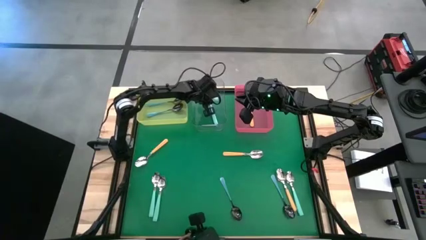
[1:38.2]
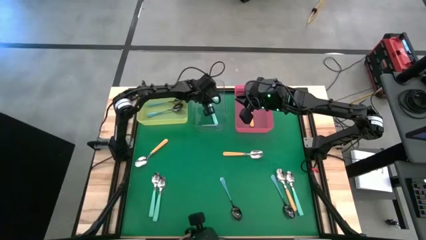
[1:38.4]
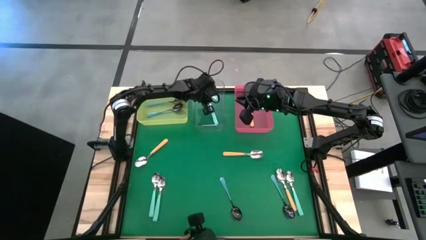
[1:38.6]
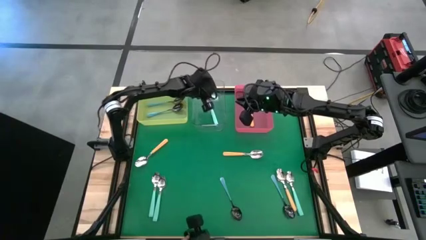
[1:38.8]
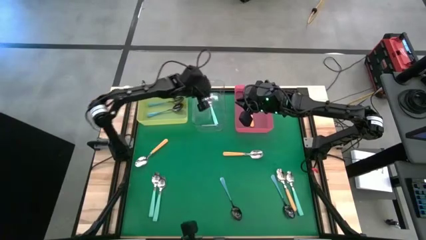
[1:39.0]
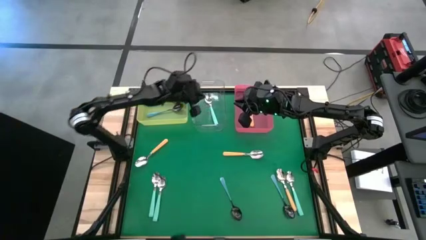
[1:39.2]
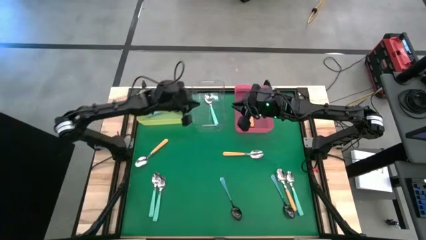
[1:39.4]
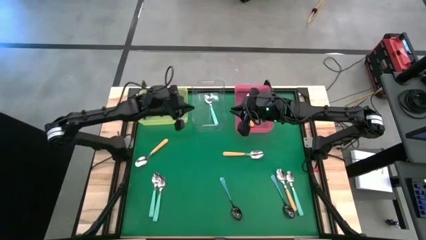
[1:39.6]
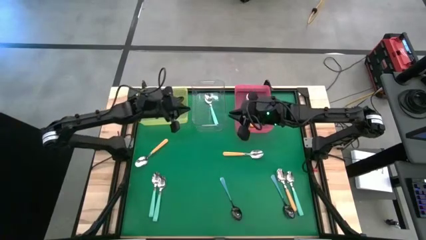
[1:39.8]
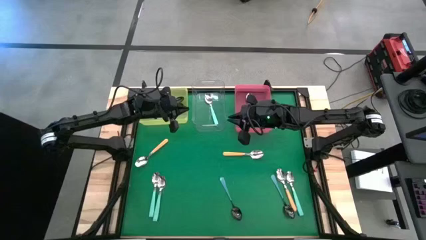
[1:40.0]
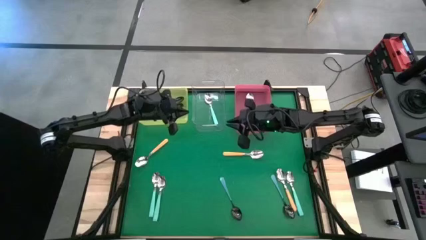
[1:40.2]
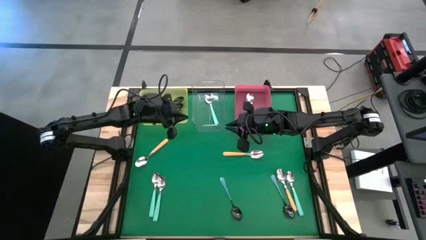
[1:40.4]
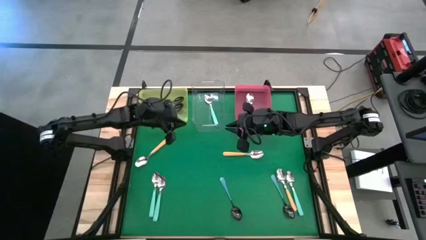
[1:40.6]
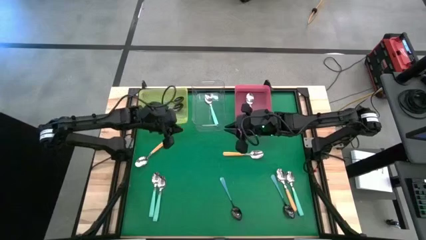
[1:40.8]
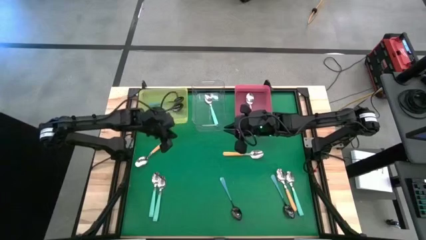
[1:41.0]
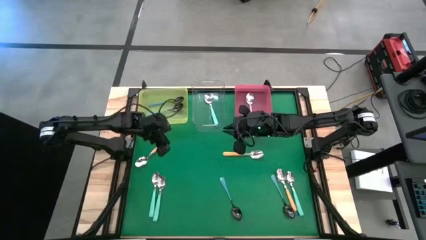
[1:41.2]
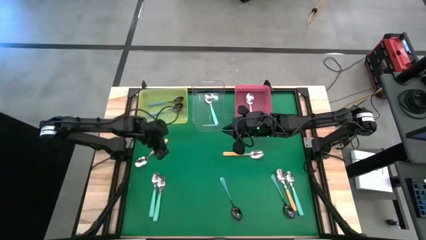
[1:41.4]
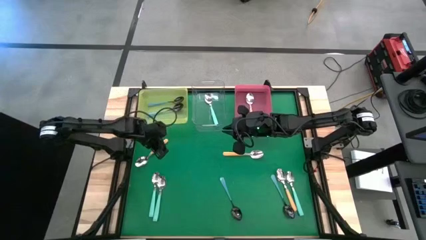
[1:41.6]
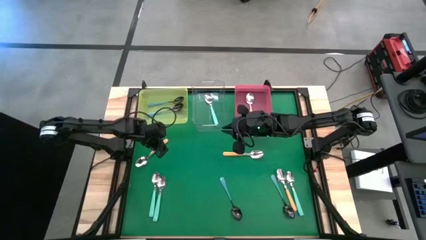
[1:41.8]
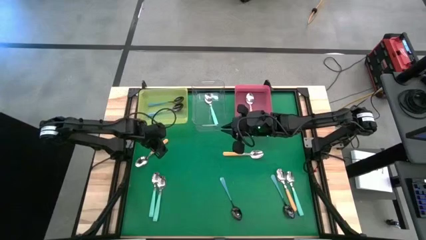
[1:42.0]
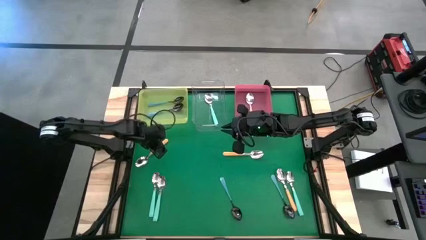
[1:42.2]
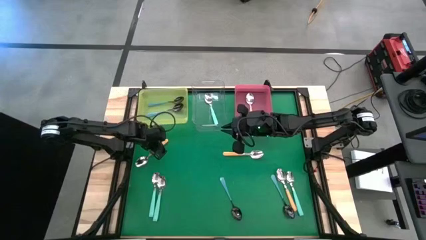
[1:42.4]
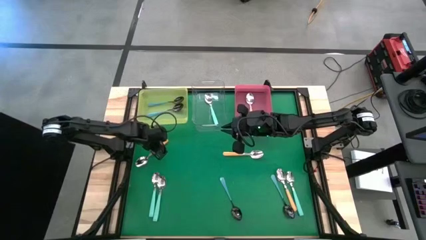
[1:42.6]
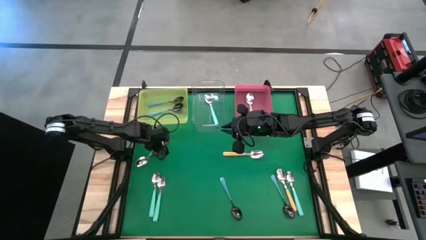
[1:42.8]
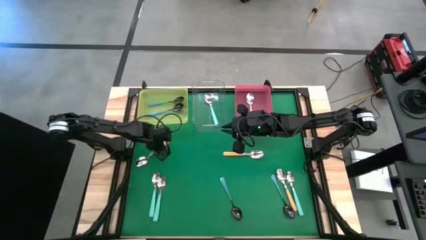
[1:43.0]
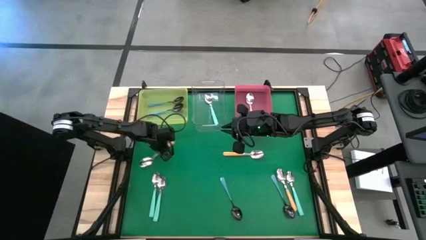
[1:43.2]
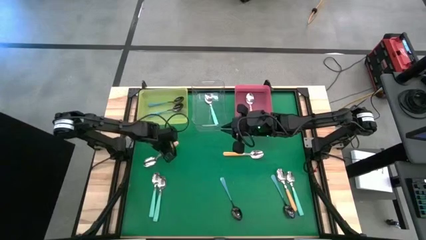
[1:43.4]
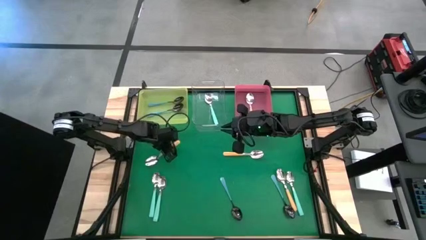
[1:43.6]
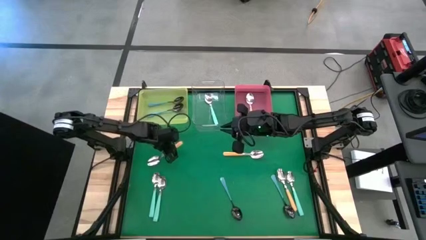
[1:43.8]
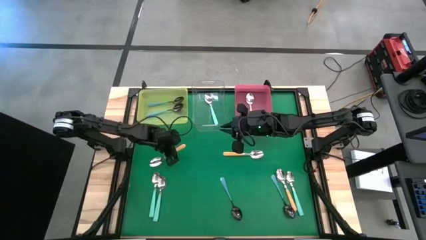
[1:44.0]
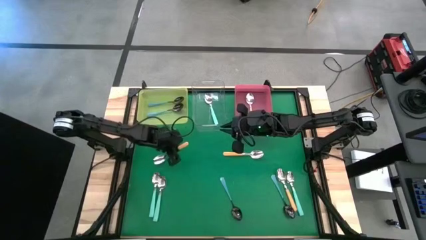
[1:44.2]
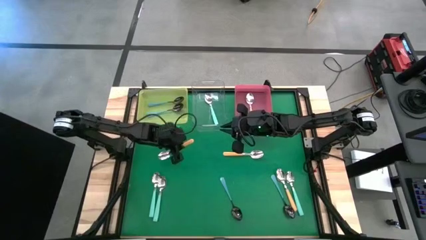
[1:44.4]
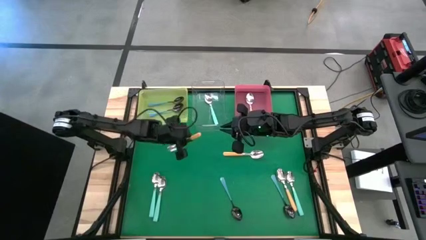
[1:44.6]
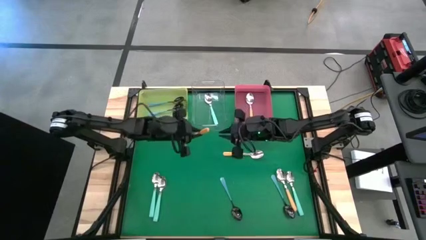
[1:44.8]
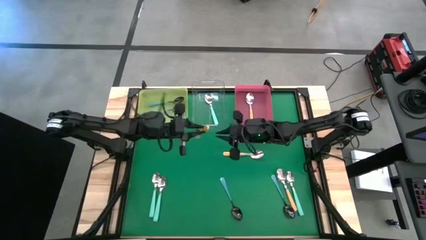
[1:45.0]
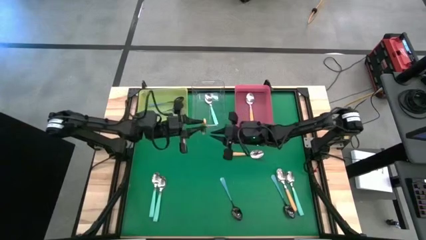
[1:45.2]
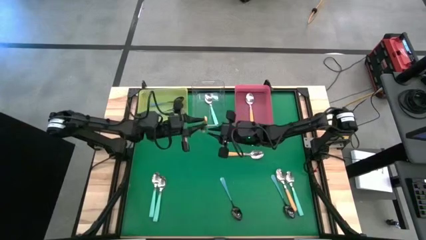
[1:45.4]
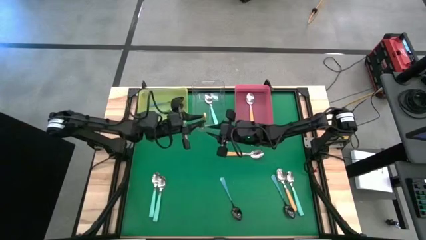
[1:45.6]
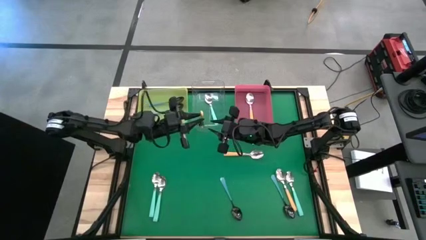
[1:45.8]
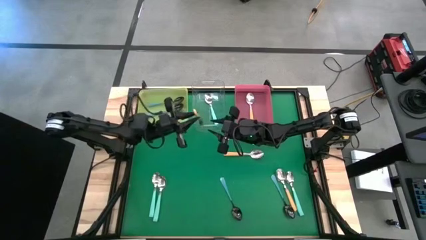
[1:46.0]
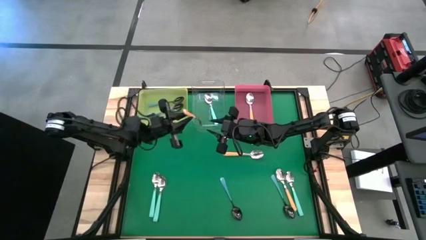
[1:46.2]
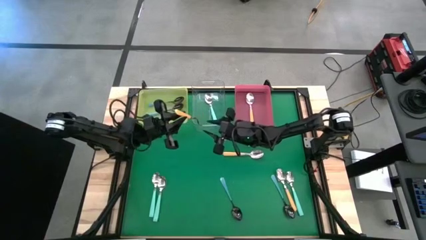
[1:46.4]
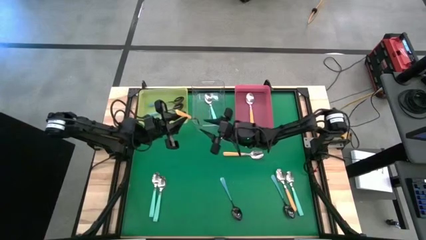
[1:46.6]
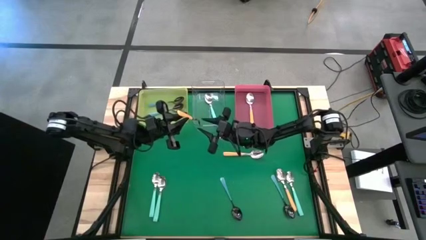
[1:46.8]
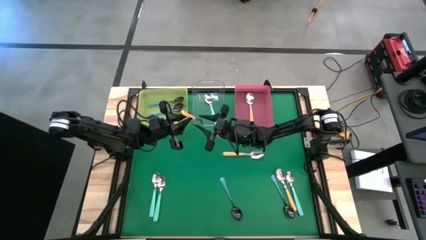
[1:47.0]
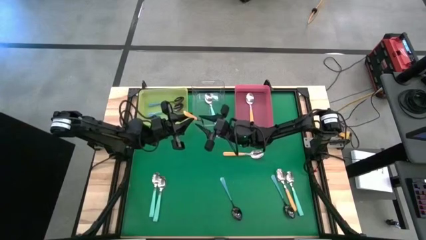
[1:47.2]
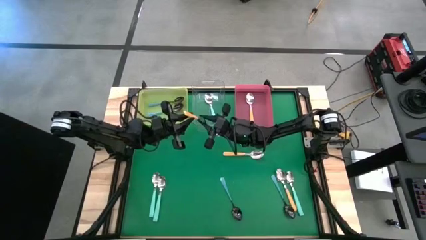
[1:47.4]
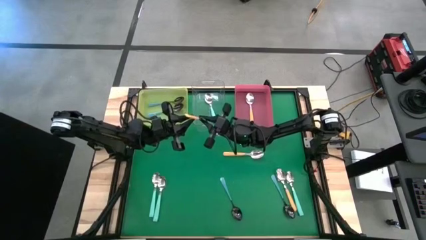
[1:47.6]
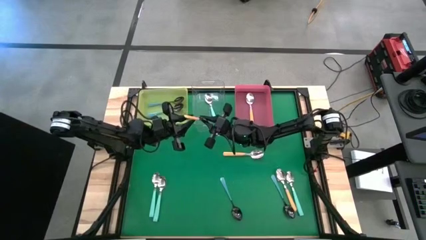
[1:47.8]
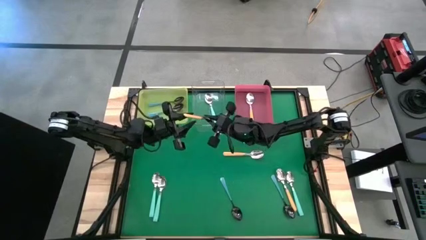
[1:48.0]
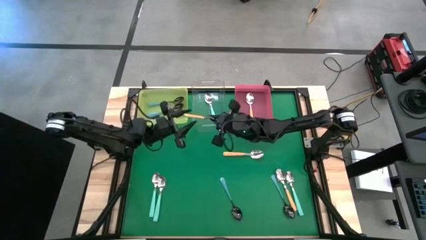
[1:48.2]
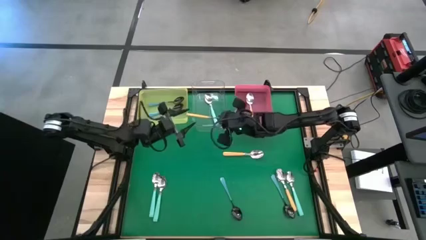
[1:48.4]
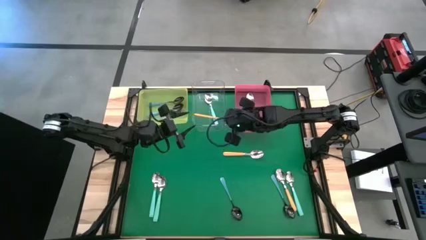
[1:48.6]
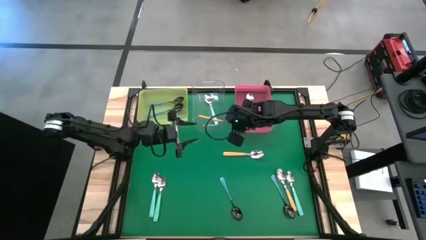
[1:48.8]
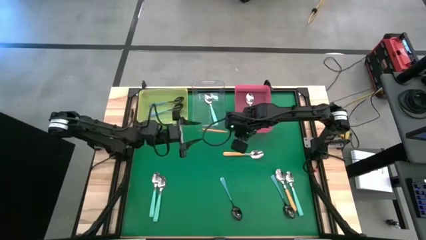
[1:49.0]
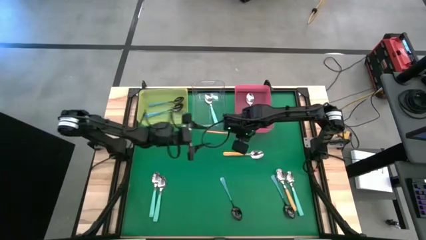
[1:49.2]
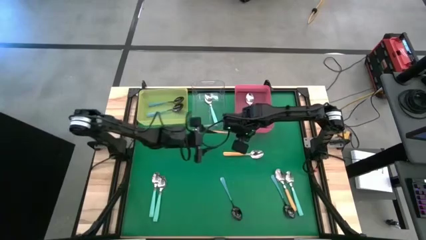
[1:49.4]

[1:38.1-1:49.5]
Task: Sort silverware by color (type)
Put the yellow spoon into the red bin
